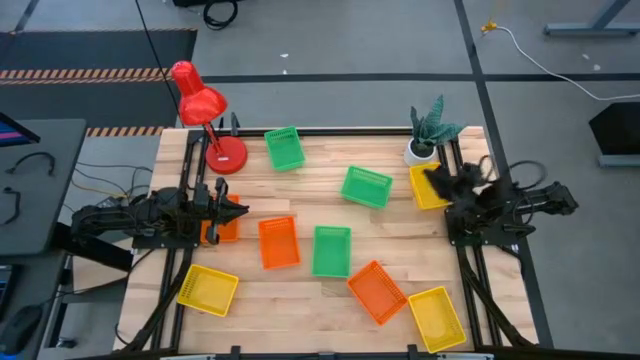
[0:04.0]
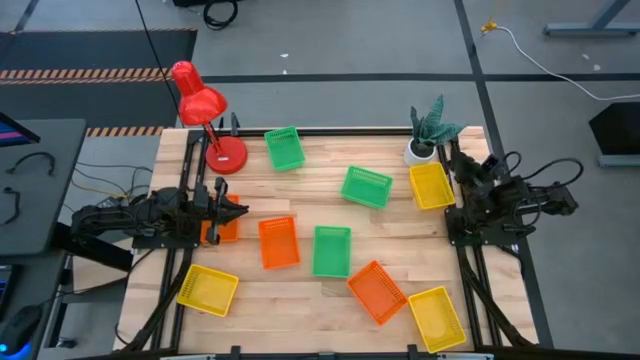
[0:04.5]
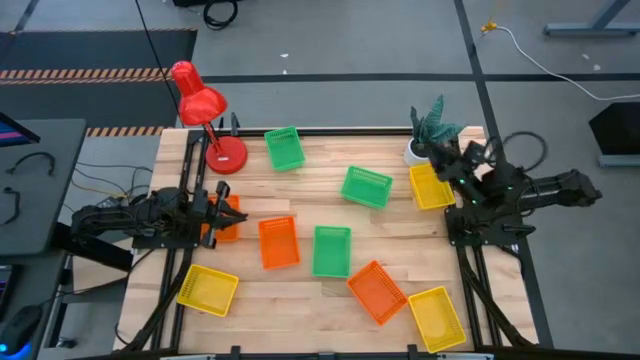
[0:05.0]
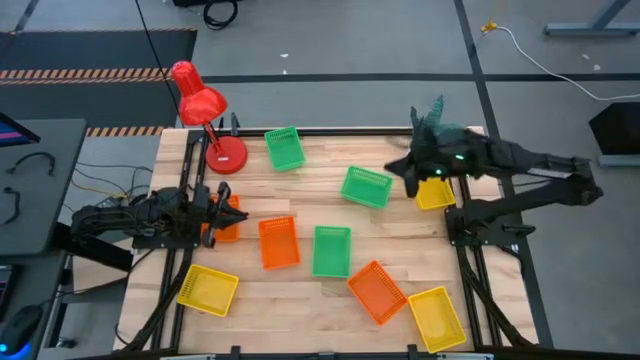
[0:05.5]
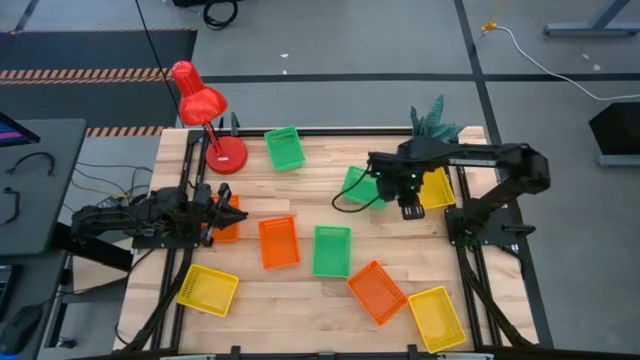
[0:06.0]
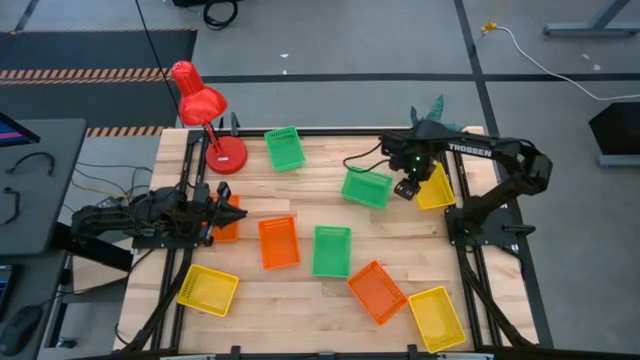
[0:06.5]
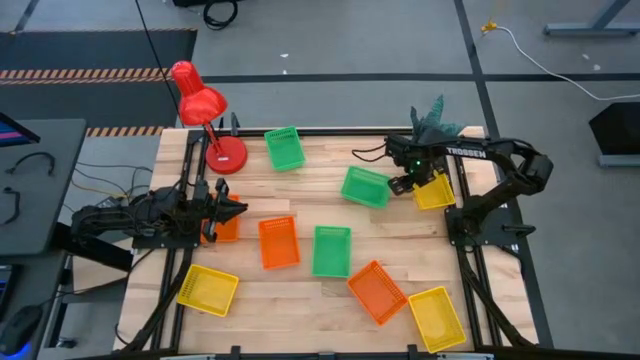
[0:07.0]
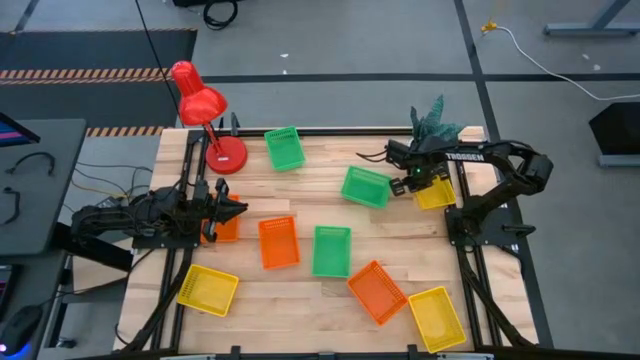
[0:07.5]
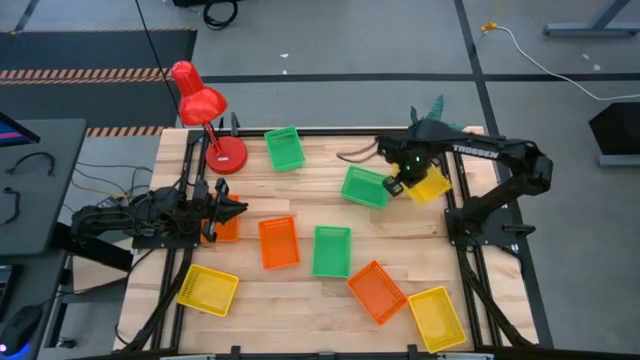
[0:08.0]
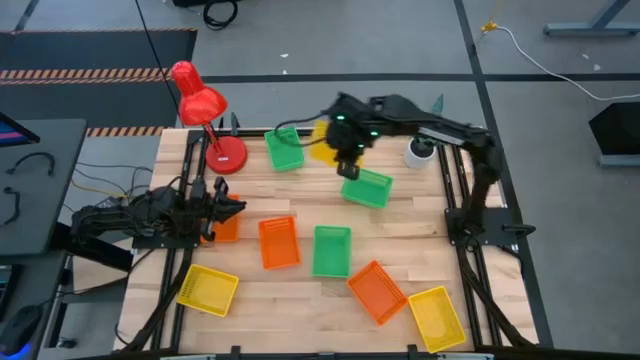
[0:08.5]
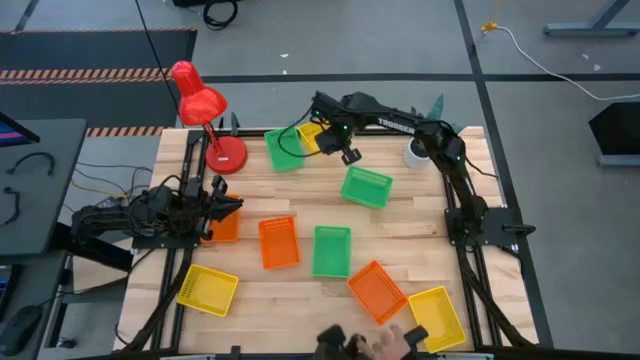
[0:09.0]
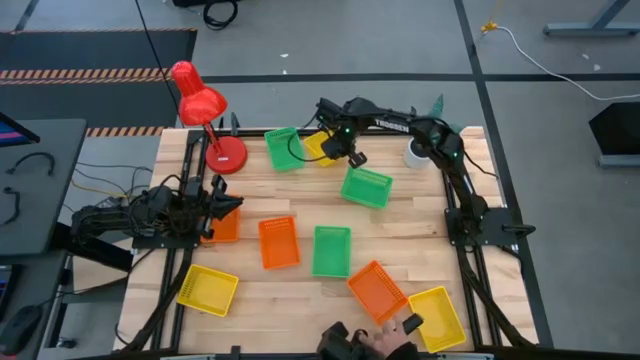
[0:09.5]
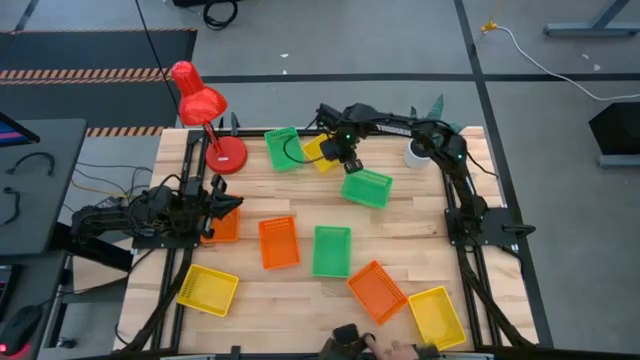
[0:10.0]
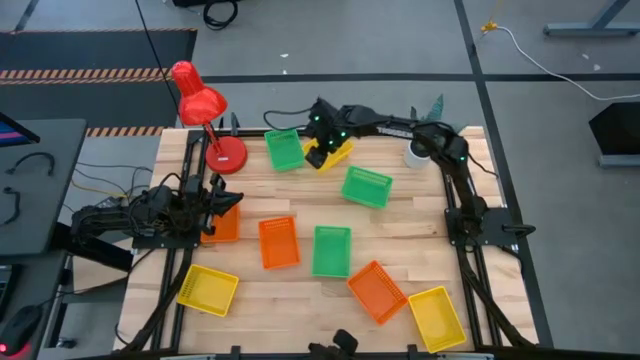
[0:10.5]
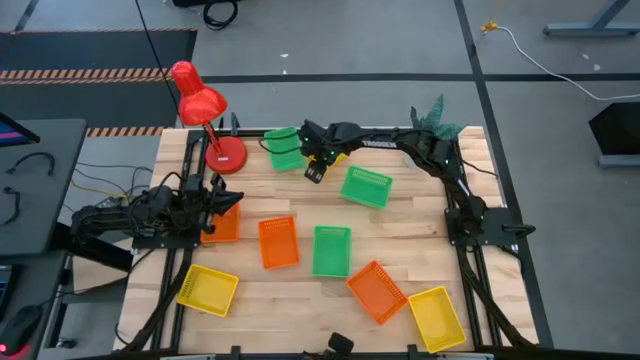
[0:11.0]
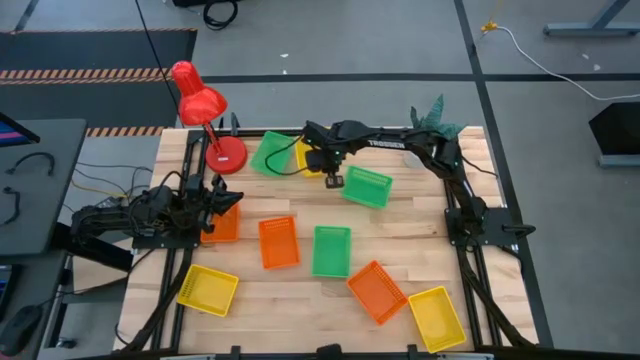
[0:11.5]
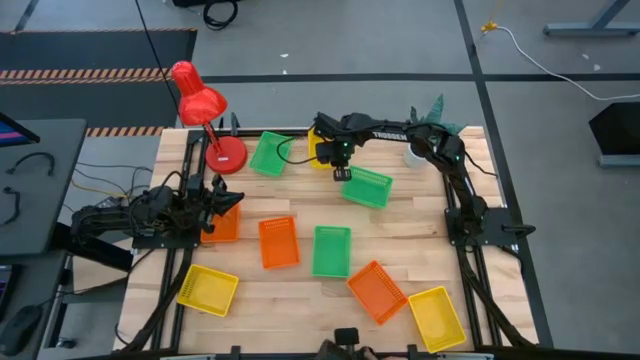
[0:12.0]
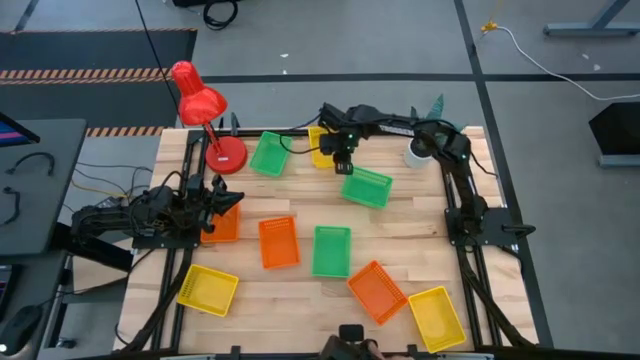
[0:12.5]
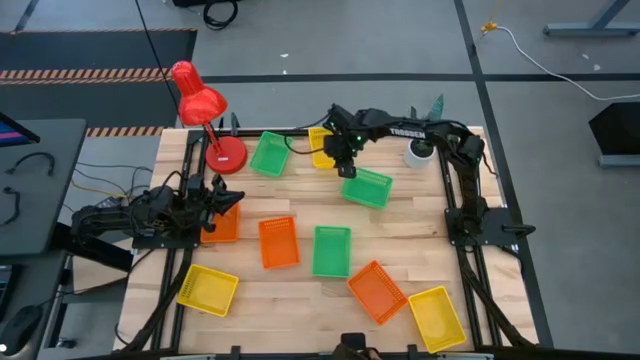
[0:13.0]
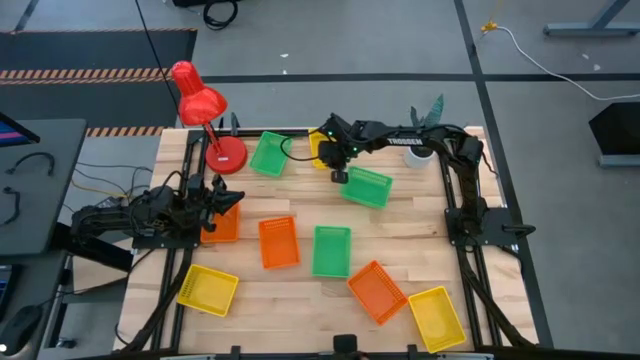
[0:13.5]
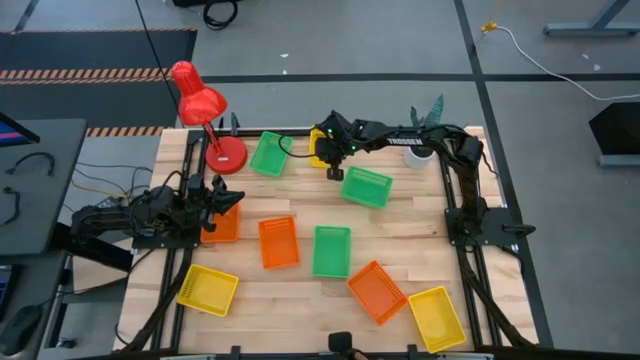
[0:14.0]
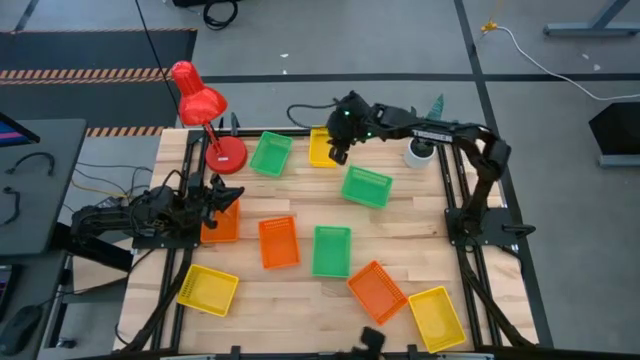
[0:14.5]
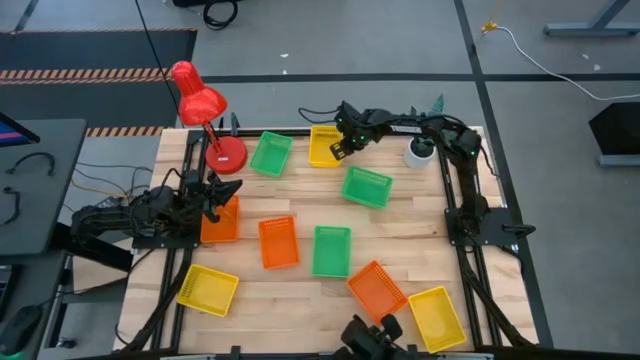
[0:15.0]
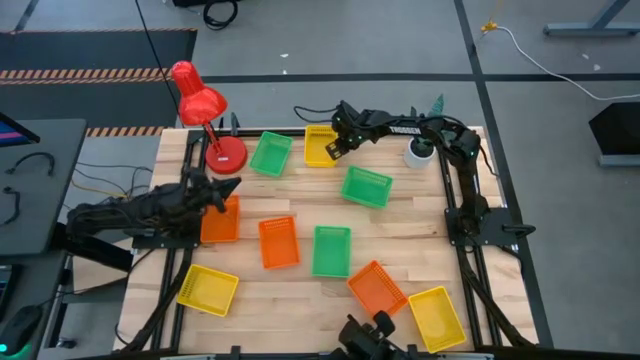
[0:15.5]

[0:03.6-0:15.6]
Move the top right yellow bin to the top center of the table

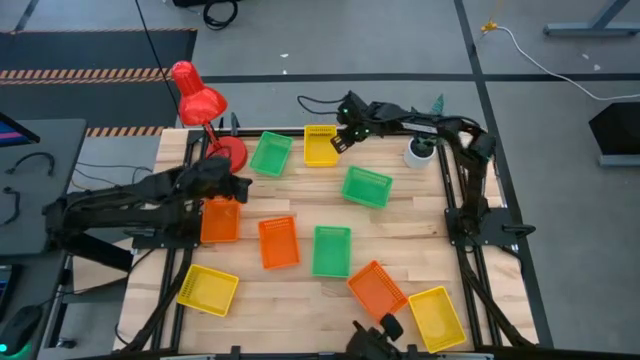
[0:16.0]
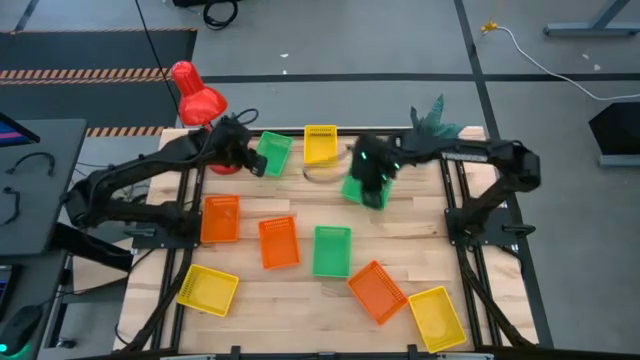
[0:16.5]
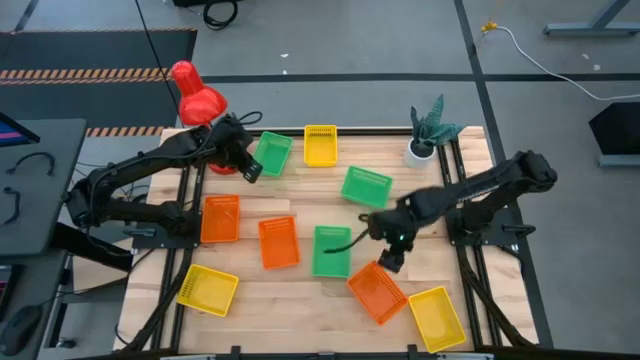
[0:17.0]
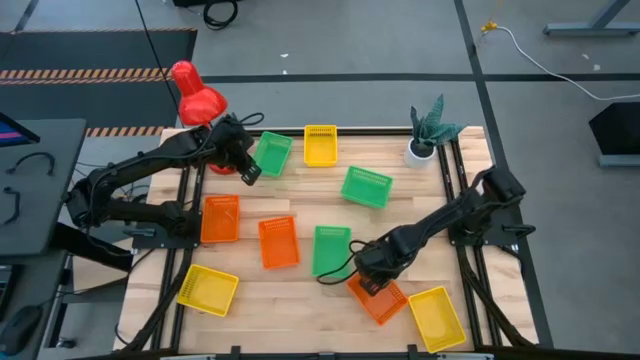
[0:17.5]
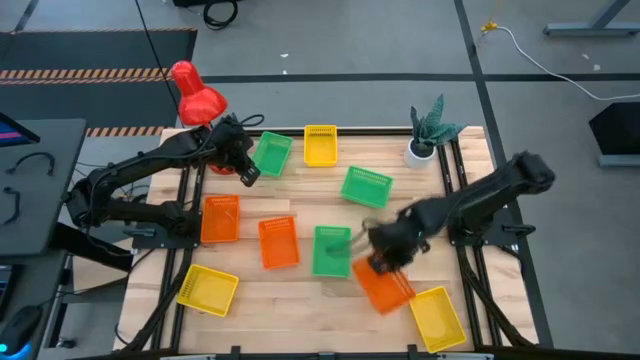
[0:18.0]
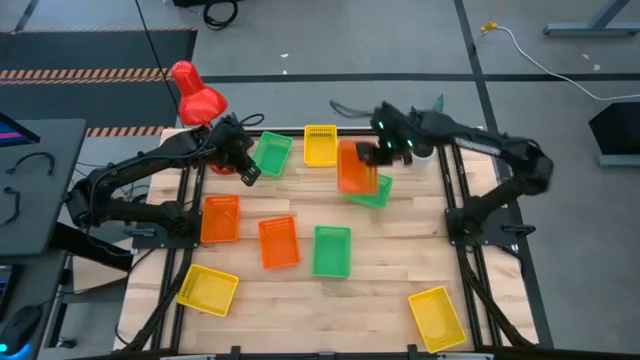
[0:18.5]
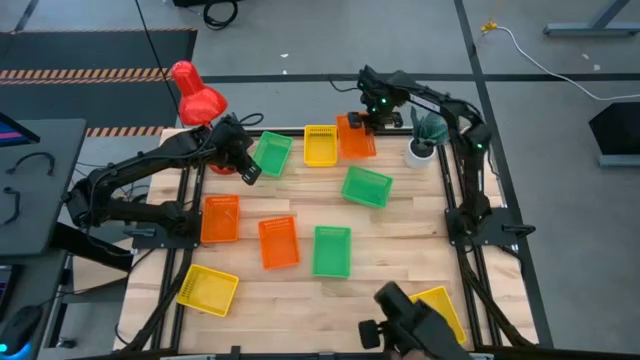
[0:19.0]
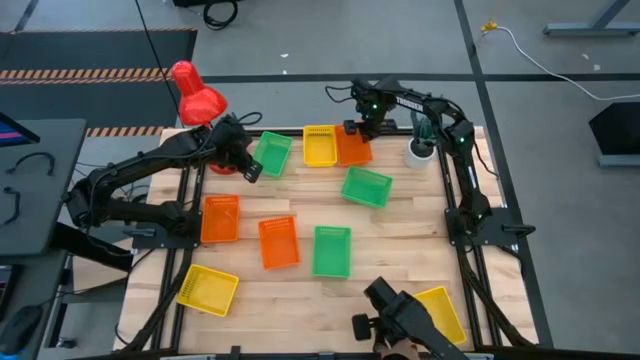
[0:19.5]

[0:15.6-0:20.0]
Move the right orange bin to the right of the top yellow bin

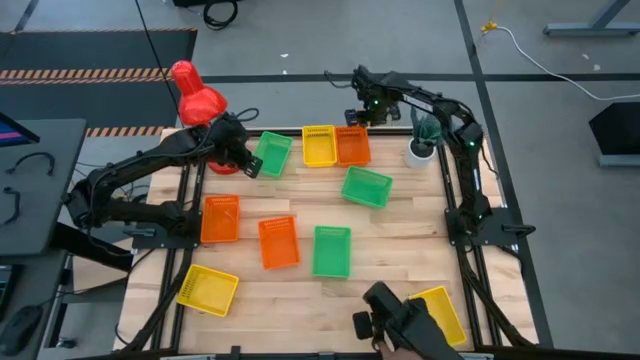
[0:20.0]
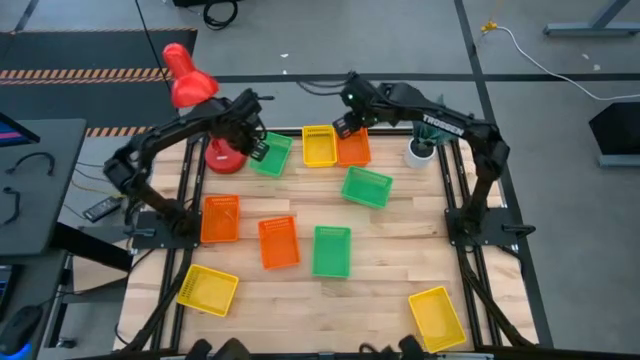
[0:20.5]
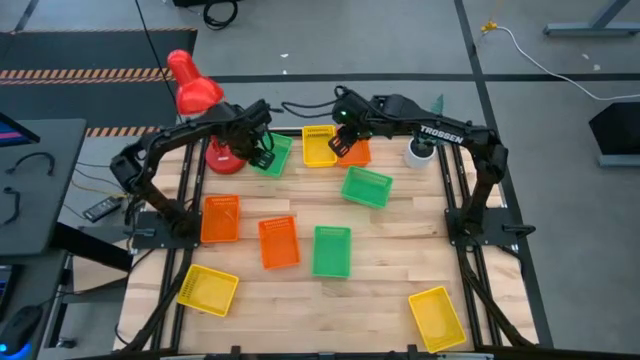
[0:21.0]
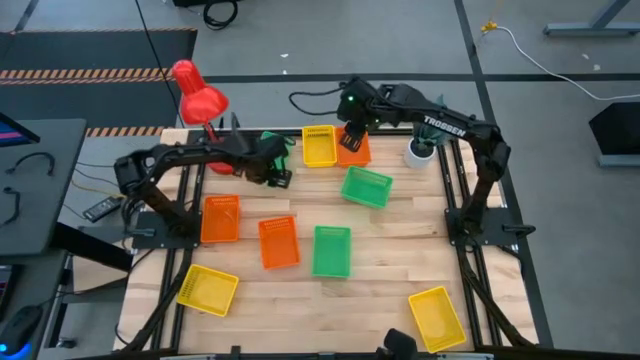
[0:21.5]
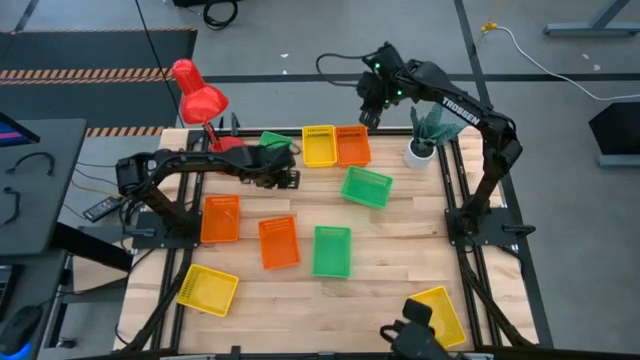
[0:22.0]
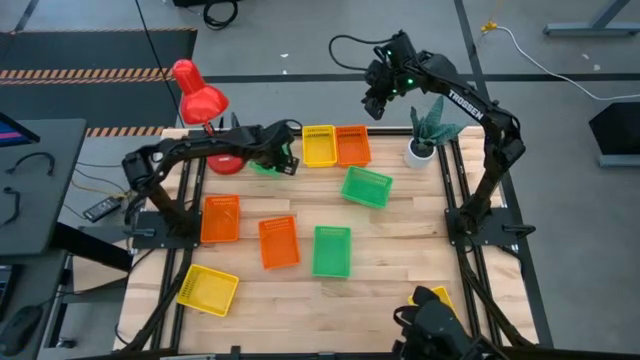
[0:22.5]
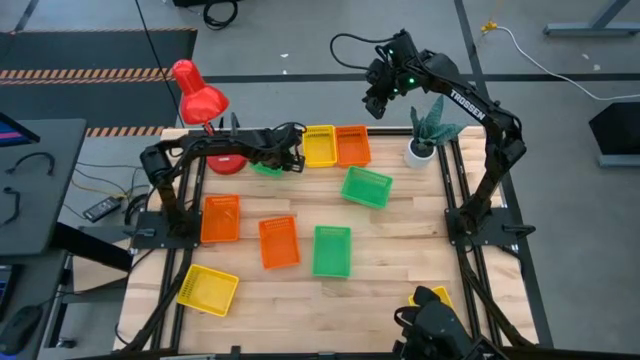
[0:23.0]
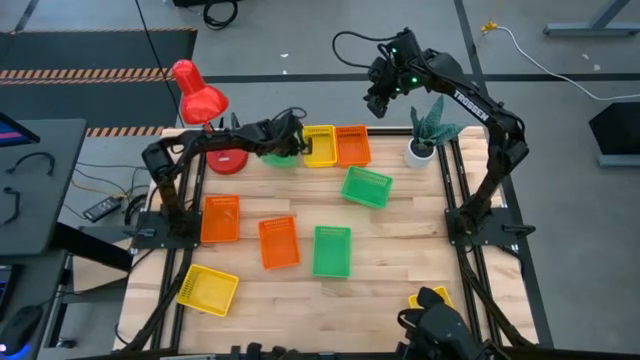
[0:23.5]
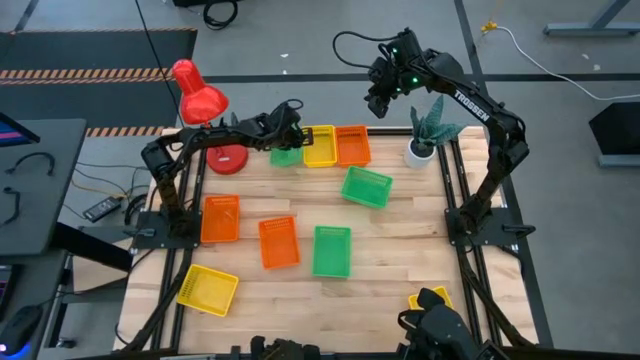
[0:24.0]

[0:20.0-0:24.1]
Adjust the top left green bin

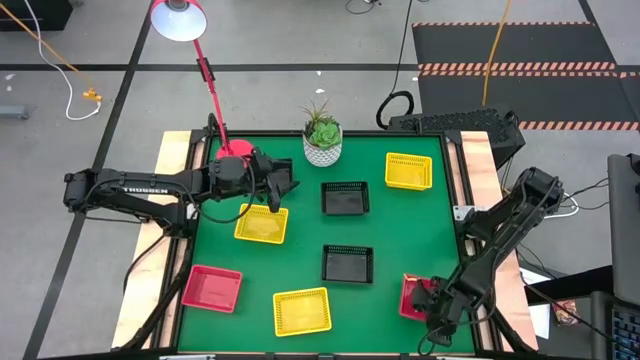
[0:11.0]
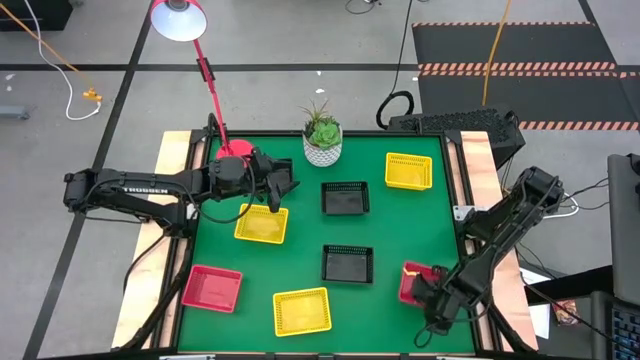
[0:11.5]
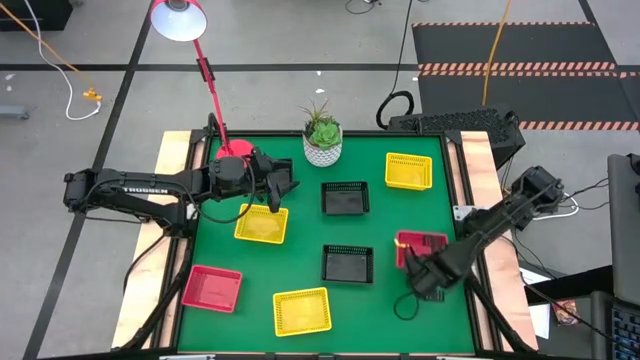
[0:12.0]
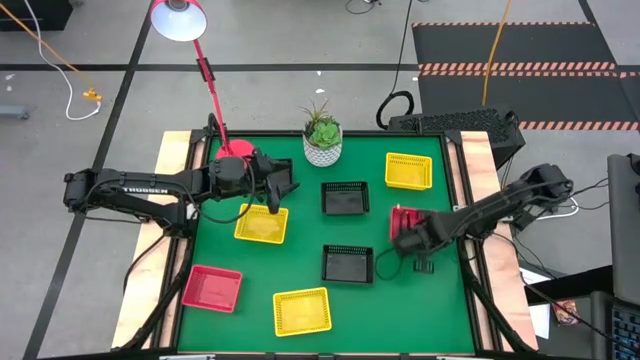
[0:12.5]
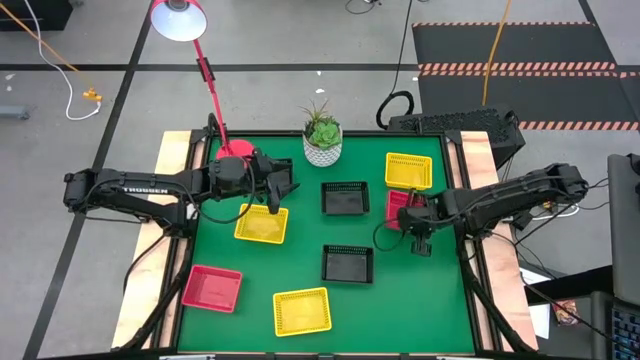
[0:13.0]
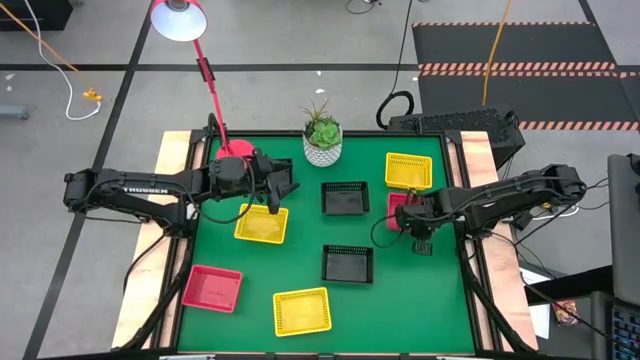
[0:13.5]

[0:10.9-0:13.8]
Move the stacked red bins to the middle left of the table
